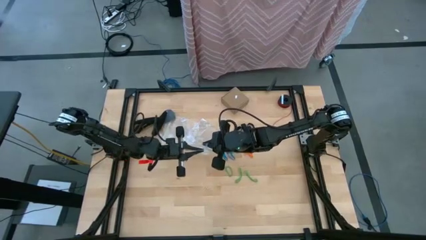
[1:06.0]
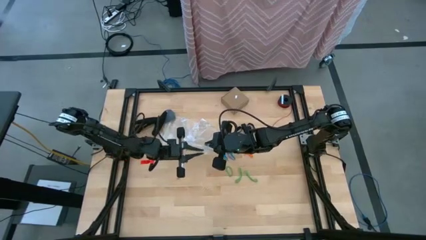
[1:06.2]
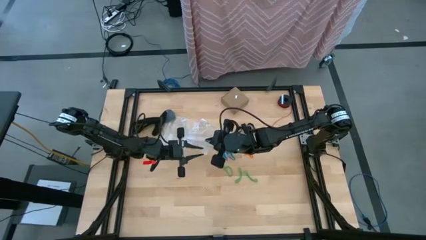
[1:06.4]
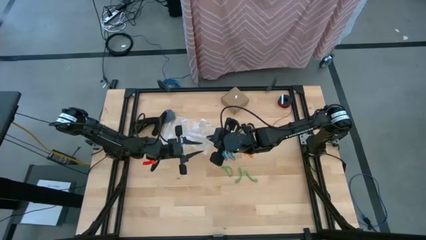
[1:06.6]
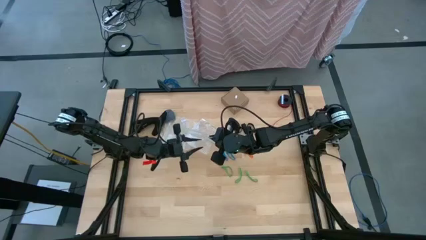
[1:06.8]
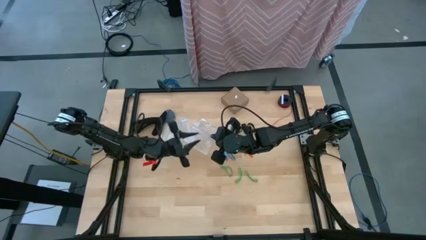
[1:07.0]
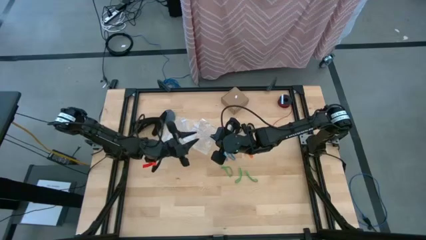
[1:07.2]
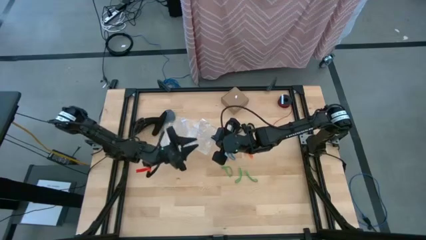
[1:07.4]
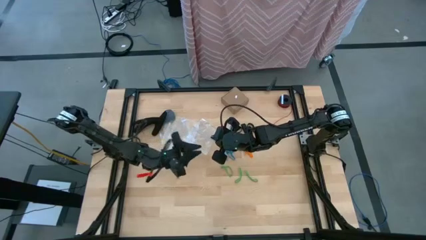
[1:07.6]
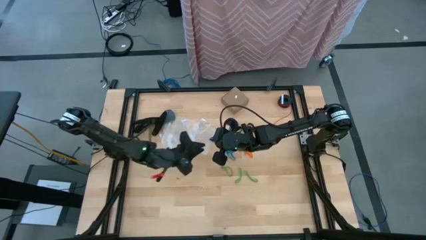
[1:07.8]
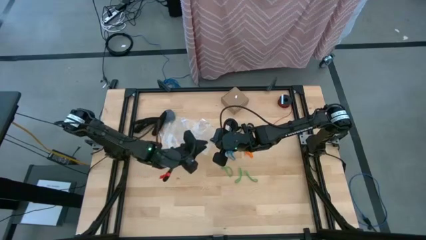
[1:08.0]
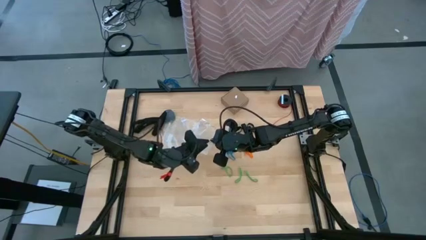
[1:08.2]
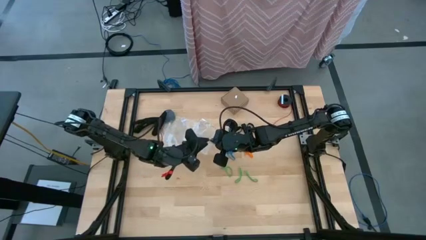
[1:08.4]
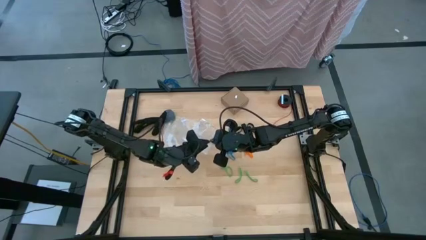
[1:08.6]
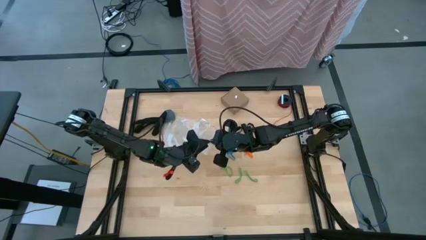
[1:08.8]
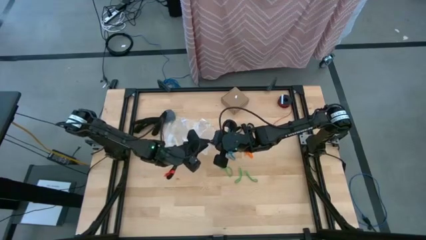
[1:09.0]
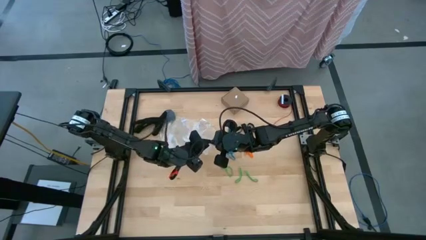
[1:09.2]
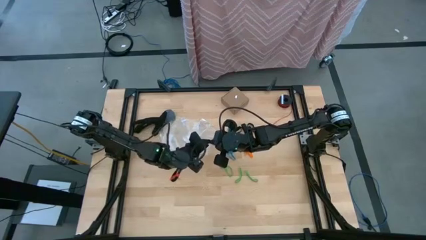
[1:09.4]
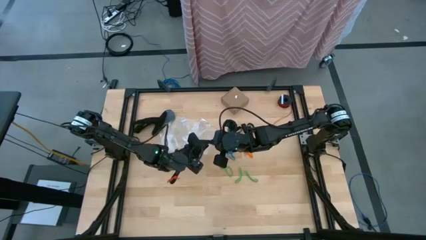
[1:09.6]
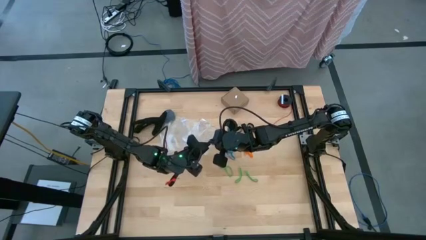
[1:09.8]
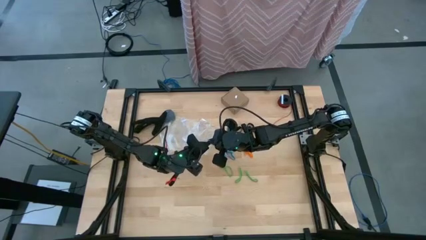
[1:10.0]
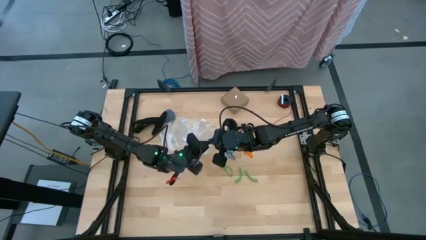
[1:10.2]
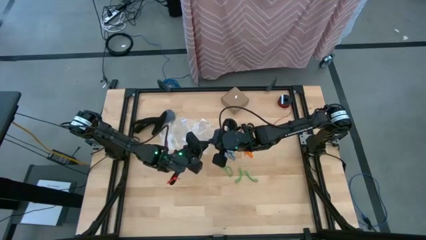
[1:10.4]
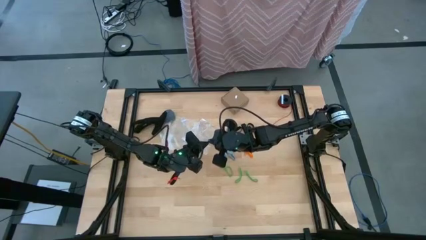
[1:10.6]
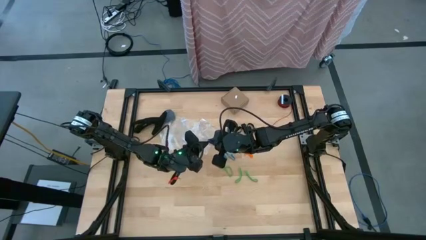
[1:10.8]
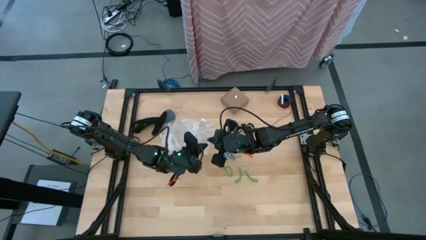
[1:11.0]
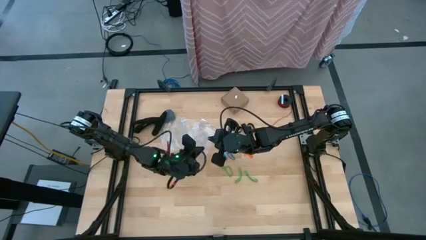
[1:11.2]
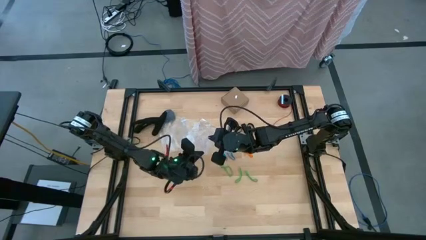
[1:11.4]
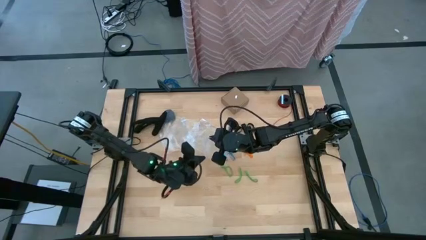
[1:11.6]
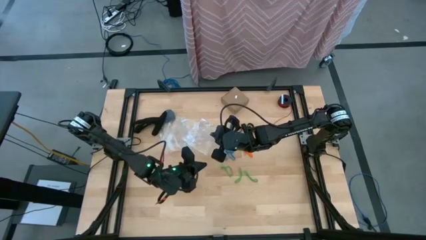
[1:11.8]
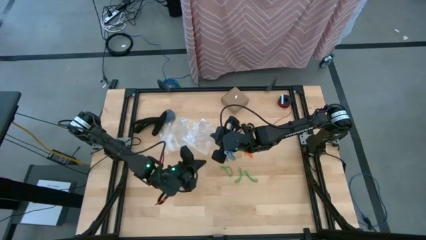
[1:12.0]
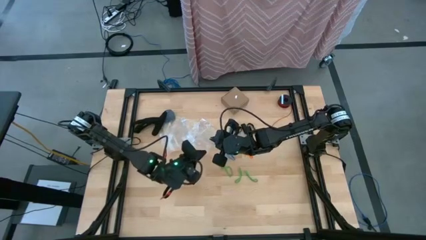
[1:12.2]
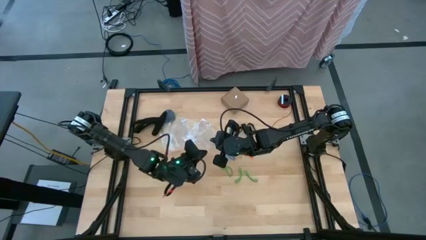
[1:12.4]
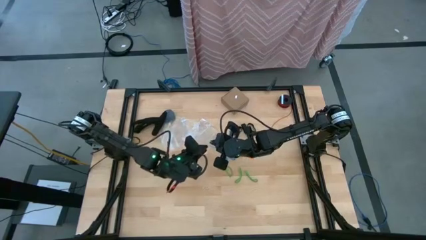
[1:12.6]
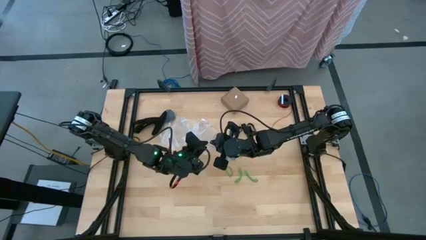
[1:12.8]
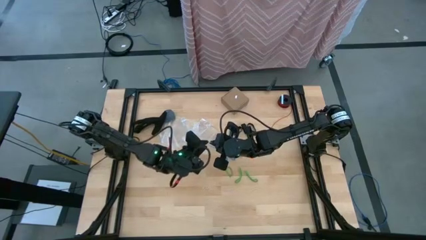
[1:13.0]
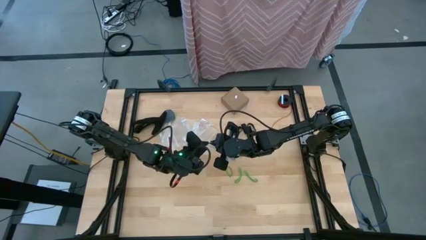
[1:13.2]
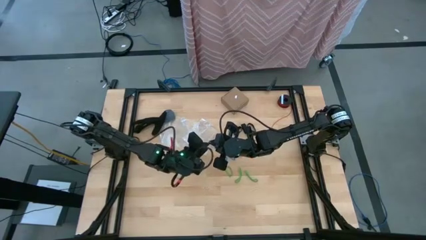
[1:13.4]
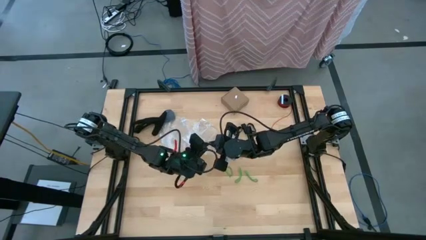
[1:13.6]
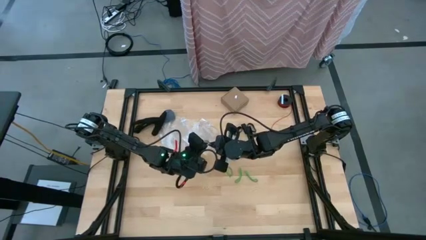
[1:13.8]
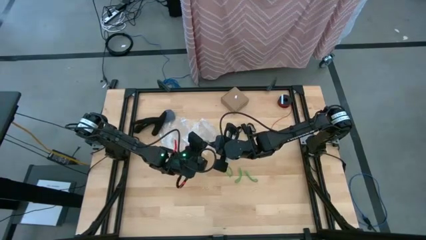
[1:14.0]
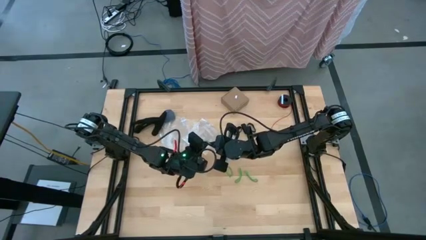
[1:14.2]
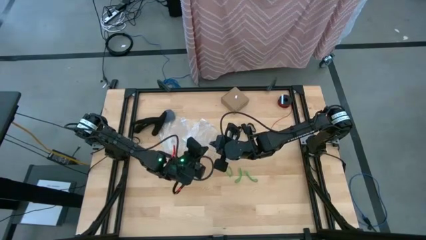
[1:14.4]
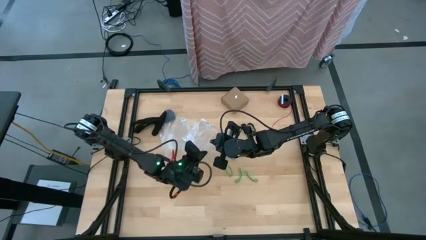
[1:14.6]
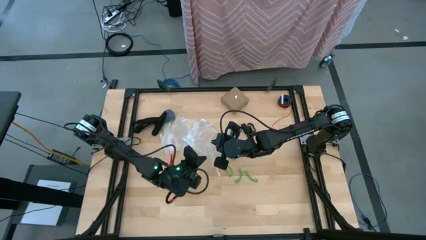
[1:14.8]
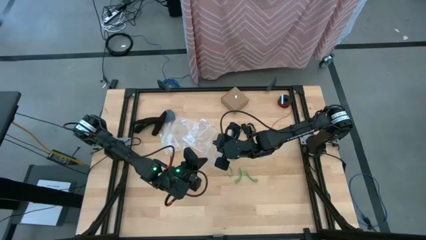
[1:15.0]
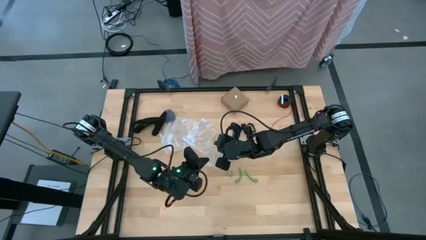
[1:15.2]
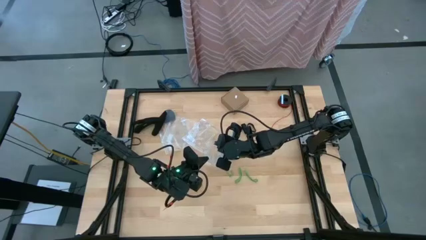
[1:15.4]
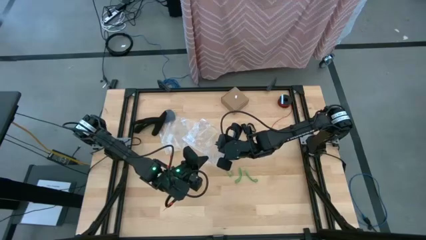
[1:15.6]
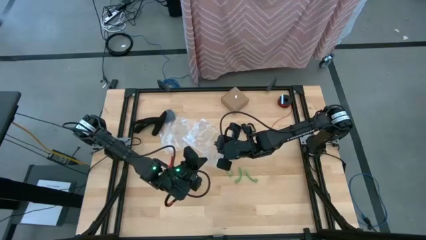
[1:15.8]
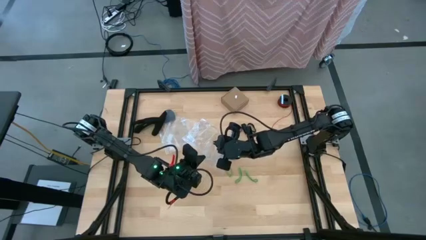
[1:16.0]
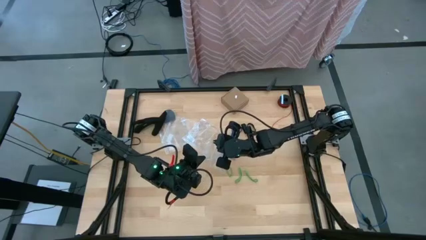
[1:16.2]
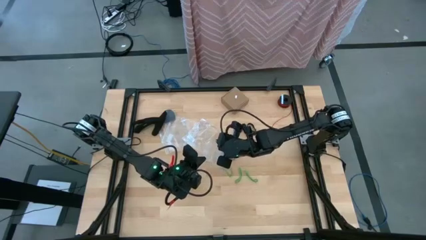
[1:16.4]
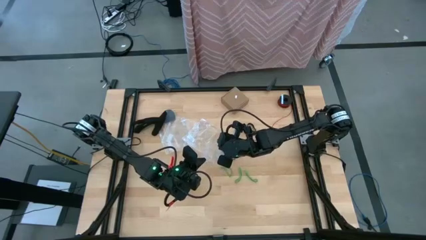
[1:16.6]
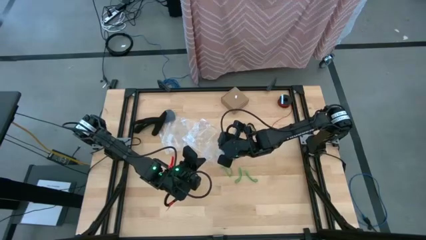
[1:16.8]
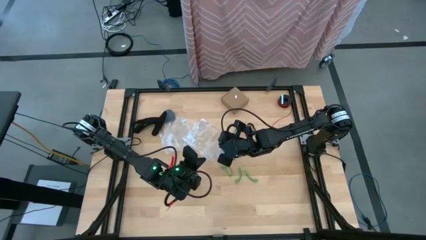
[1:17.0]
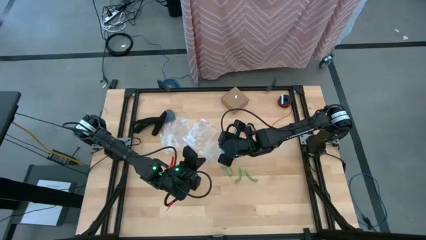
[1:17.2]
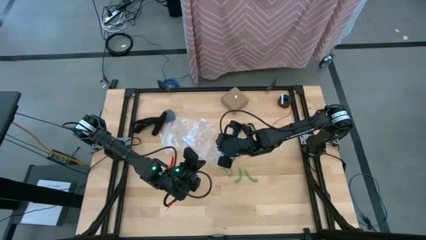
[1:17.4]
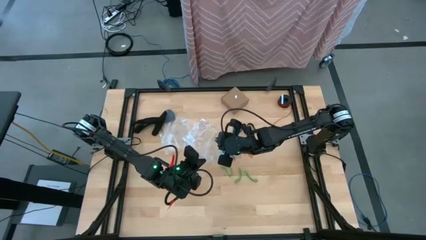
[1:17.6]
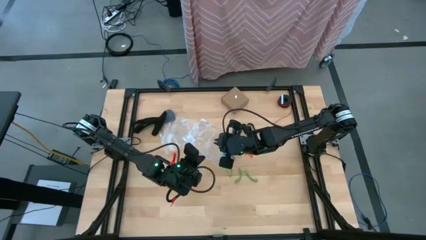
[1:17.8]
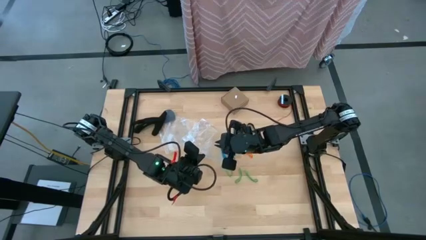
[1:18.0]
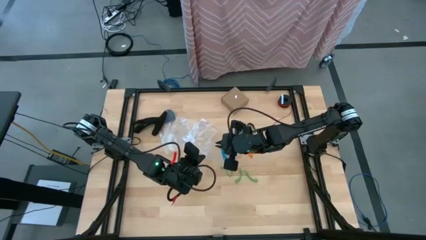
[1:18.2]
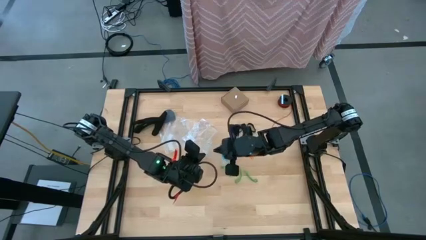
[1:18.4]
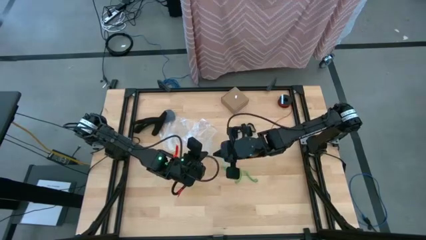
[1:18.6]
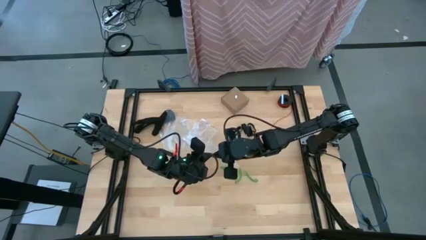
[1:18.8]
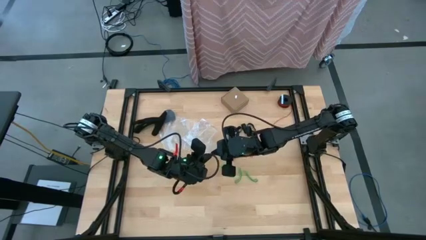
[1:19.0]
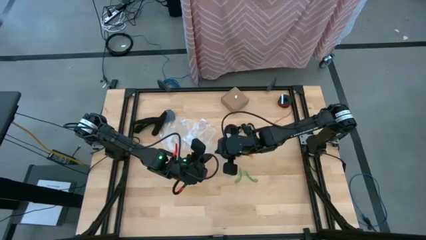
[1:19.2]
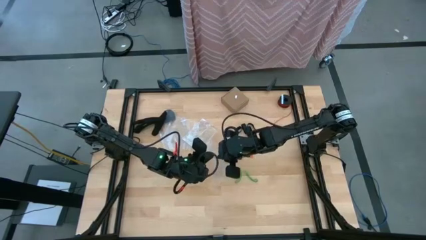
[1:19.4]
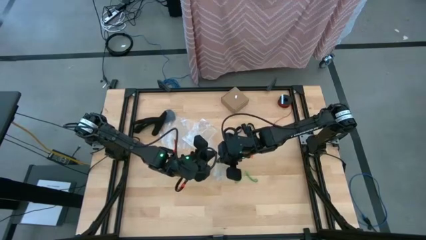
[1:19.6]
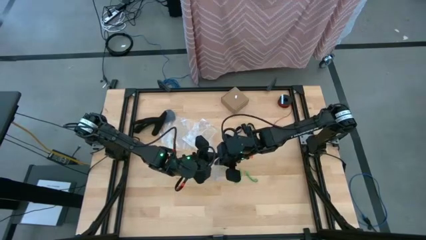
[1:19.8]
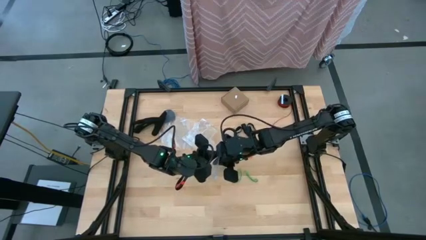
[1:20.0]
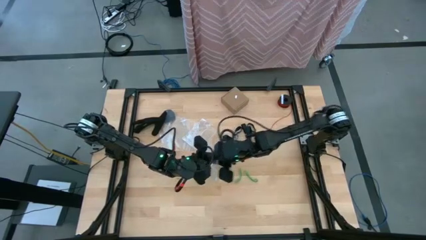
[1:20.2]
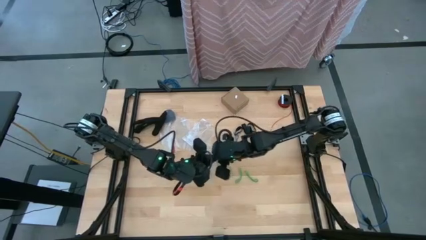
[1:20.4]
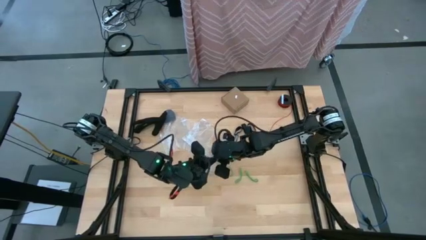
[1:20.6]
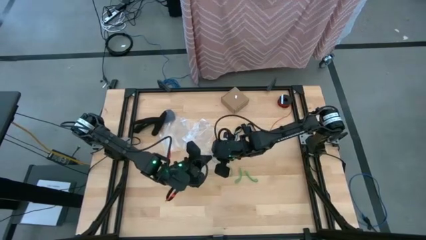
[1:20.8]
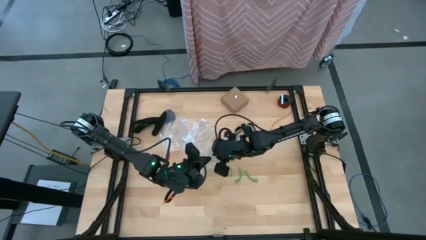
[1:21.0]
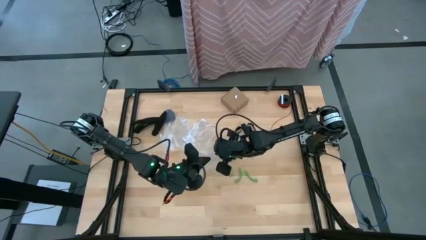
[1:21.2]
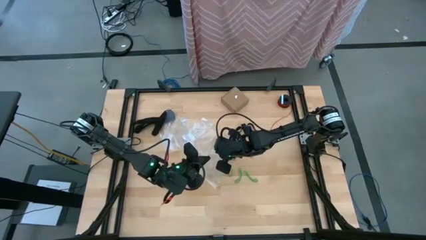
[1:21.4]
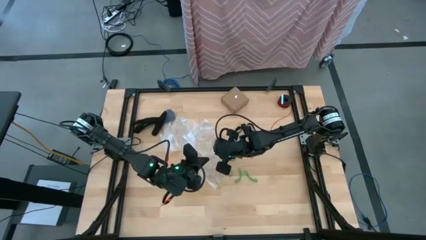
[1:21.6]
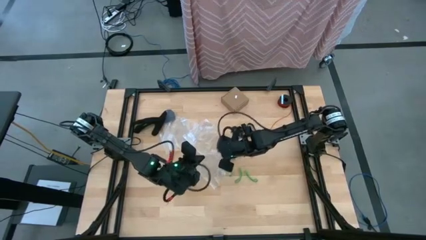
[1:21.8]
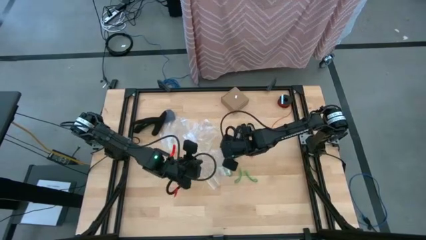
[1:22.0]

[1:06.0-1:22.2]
Task: Sort rubber bands
Open the transparent zip bag
